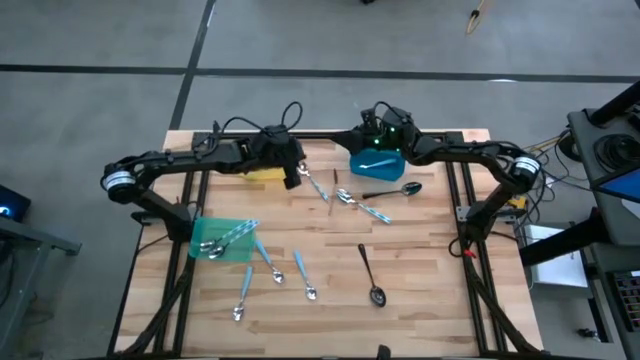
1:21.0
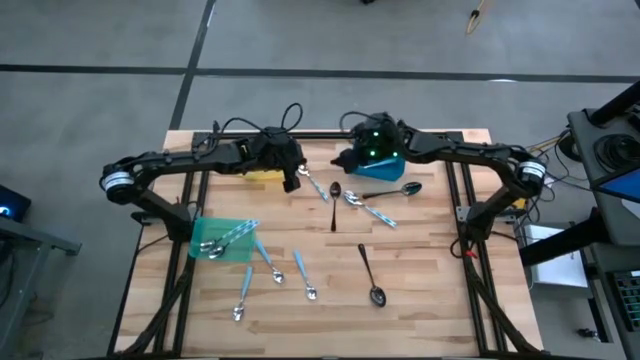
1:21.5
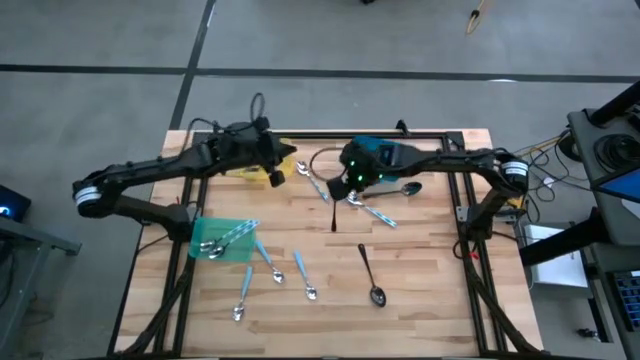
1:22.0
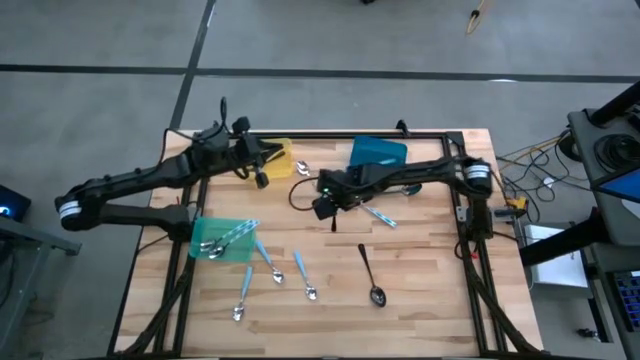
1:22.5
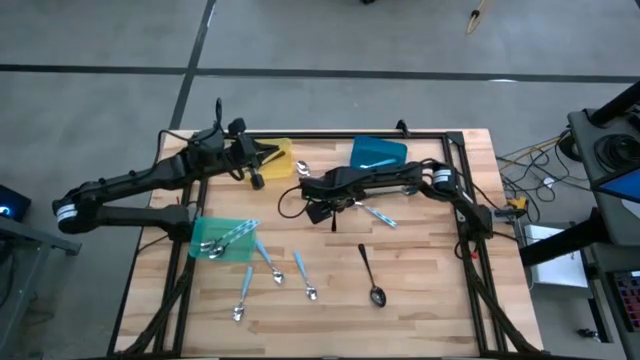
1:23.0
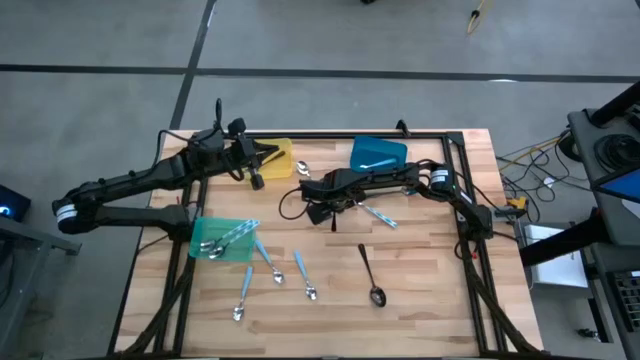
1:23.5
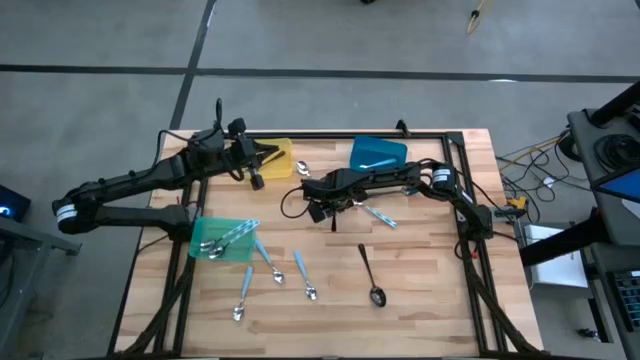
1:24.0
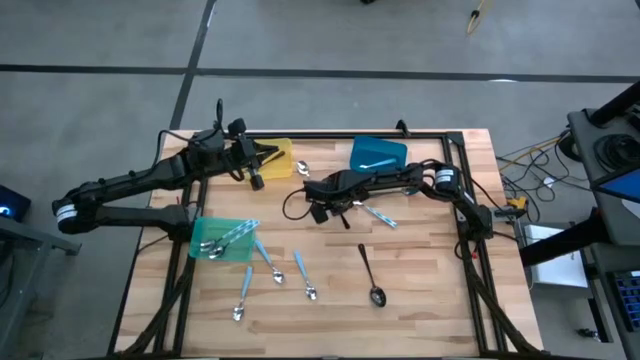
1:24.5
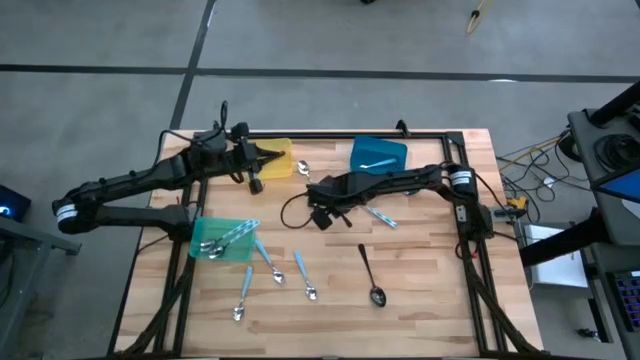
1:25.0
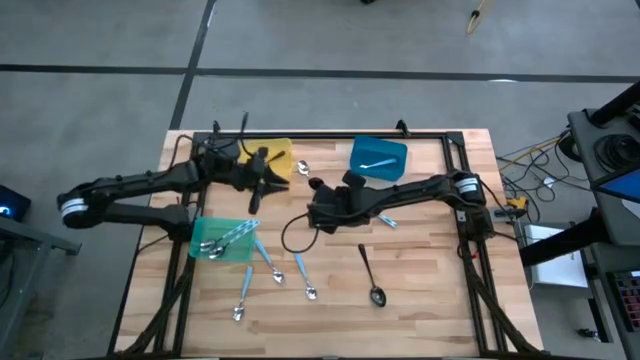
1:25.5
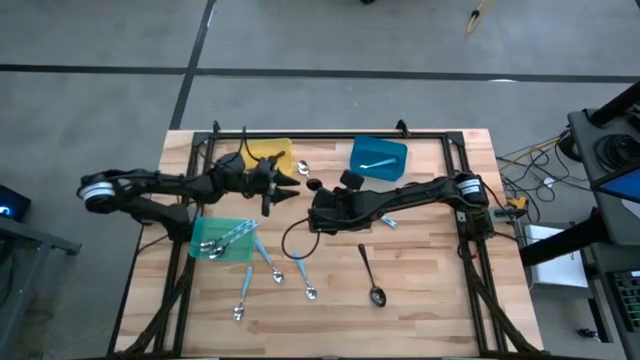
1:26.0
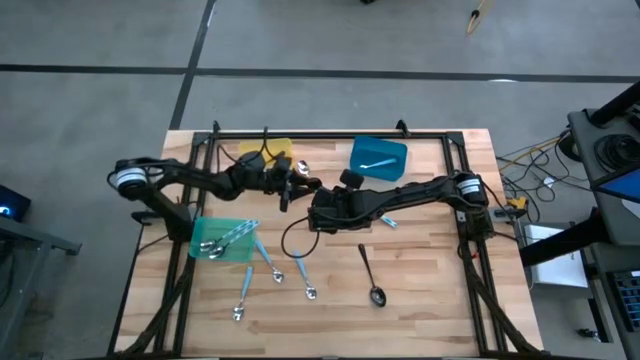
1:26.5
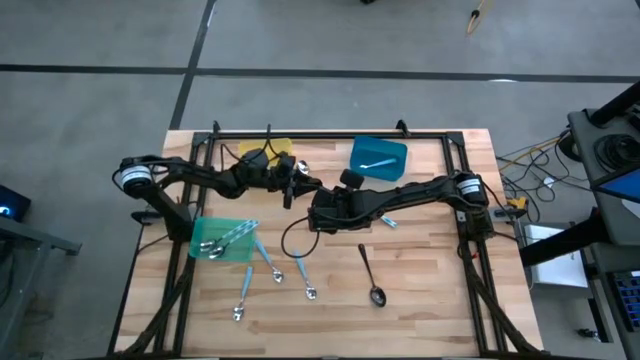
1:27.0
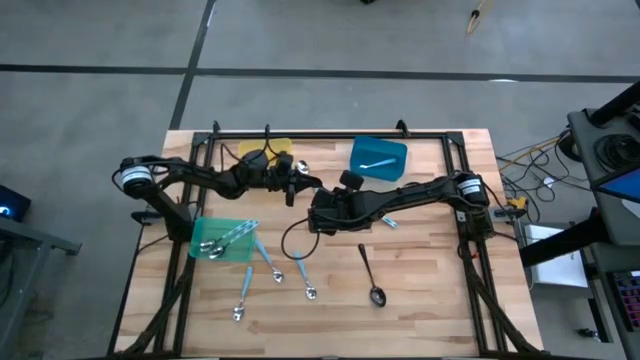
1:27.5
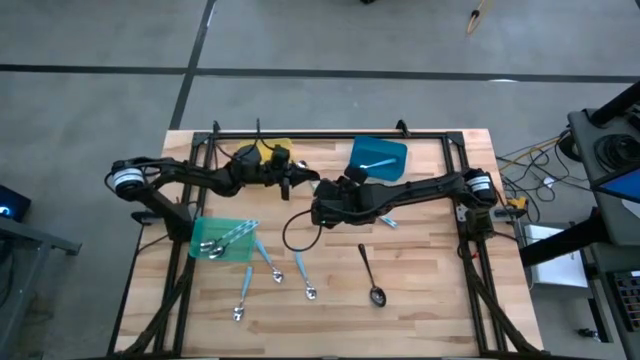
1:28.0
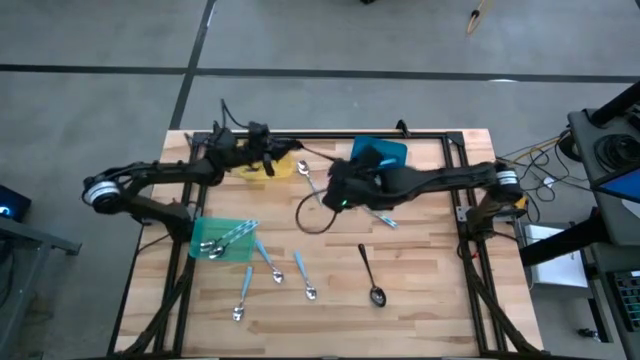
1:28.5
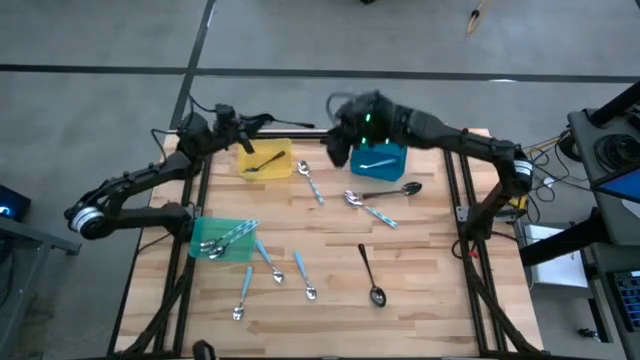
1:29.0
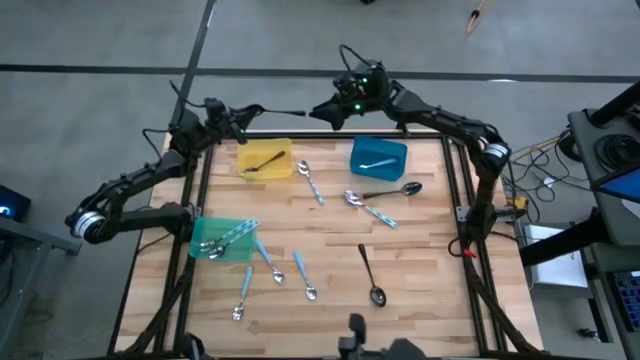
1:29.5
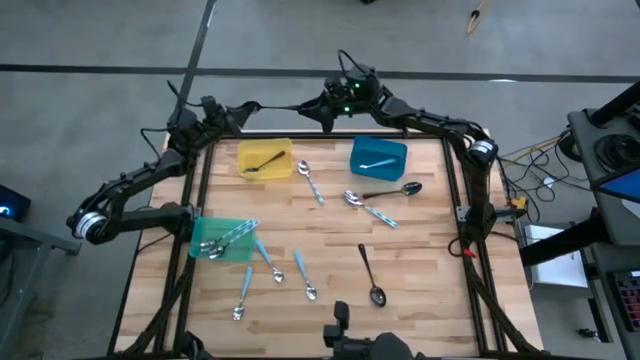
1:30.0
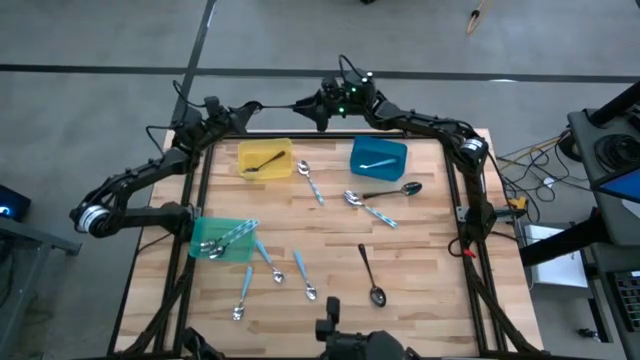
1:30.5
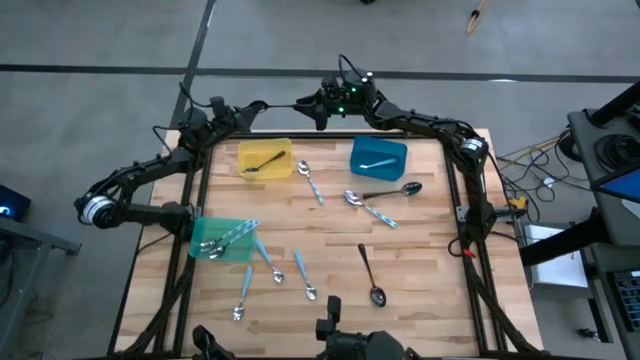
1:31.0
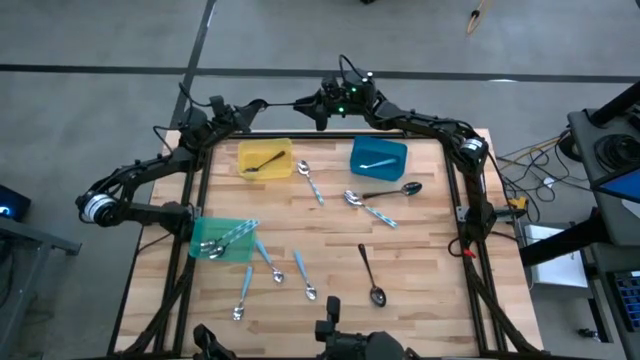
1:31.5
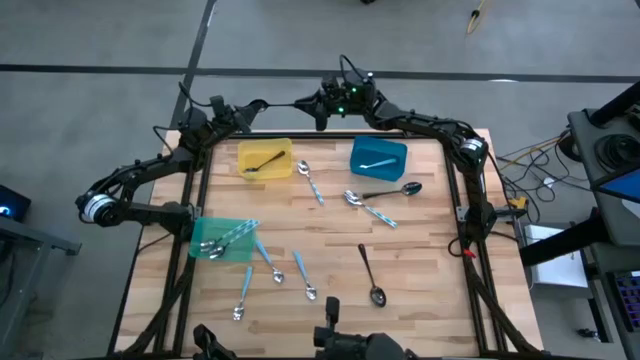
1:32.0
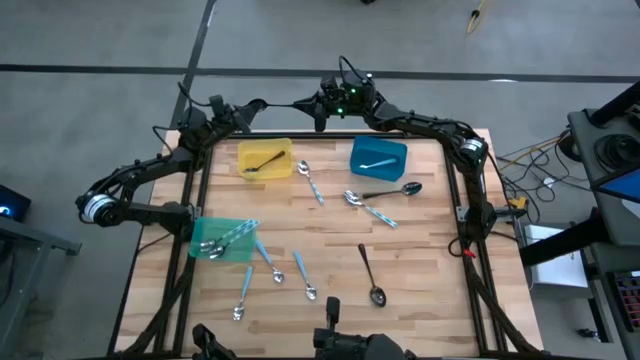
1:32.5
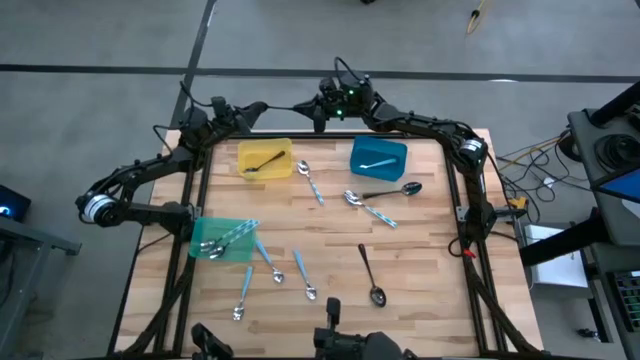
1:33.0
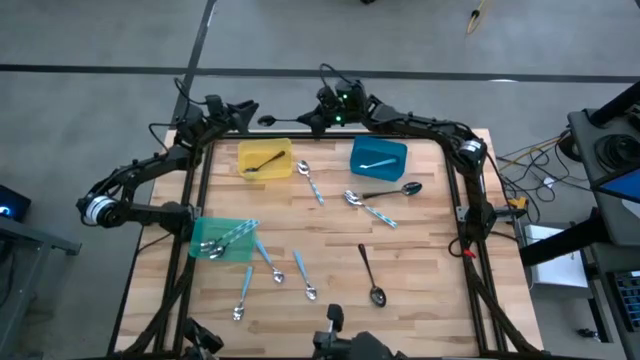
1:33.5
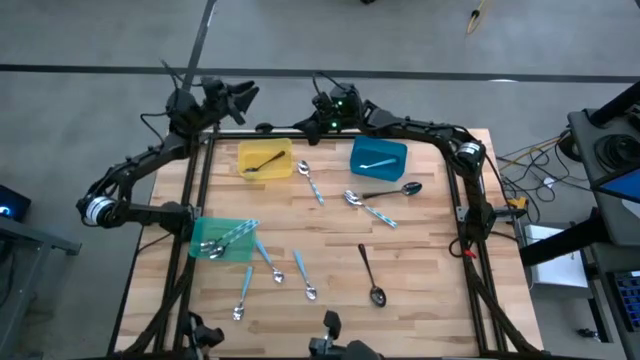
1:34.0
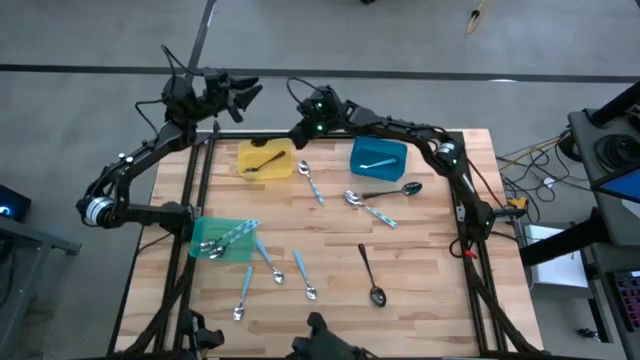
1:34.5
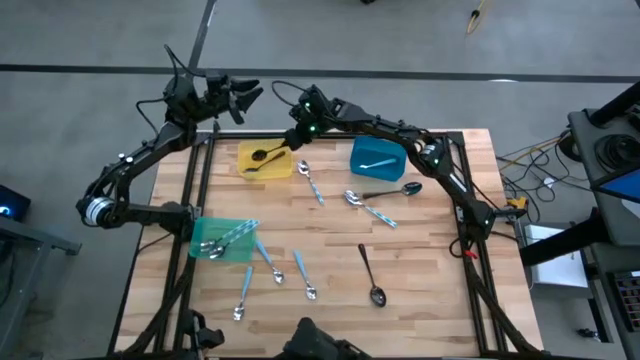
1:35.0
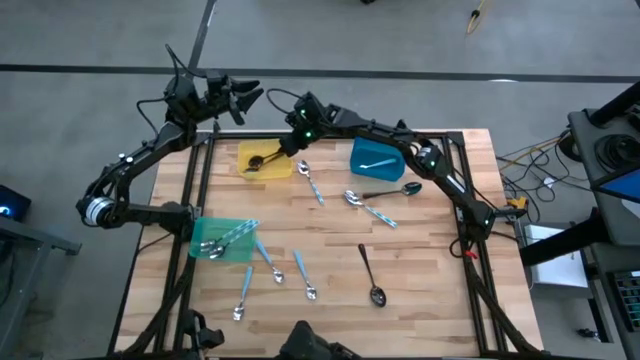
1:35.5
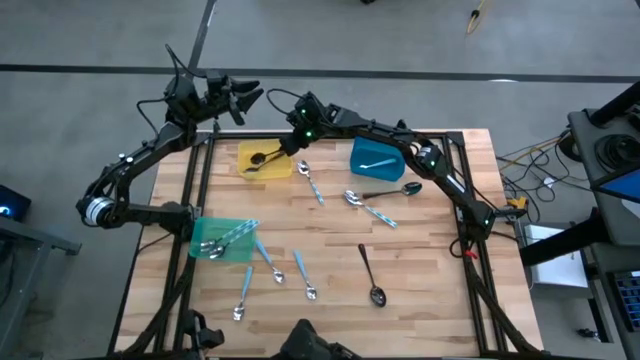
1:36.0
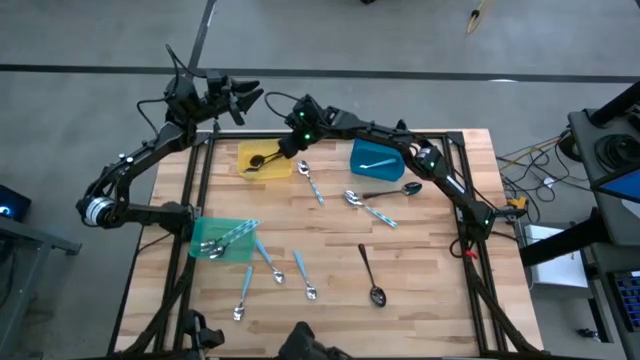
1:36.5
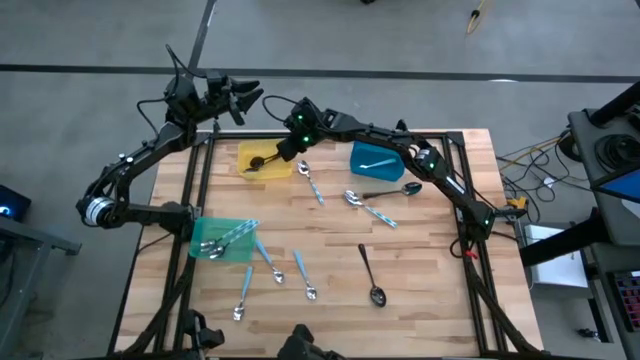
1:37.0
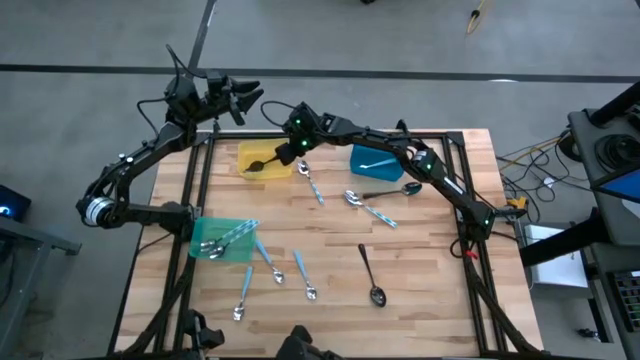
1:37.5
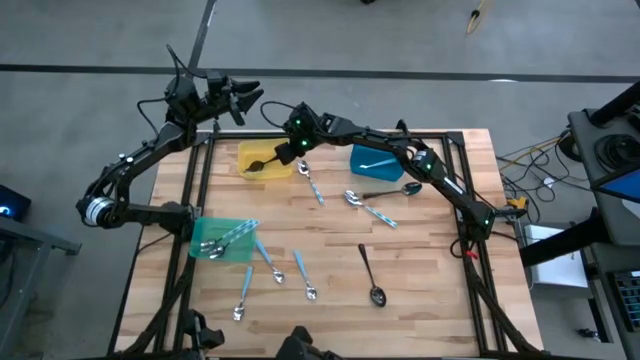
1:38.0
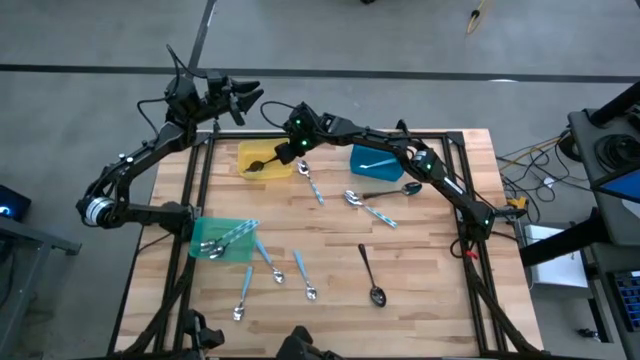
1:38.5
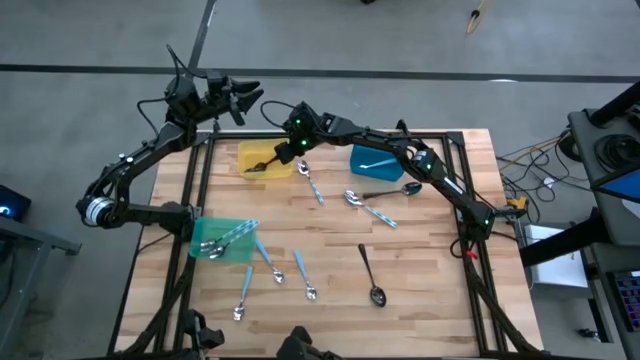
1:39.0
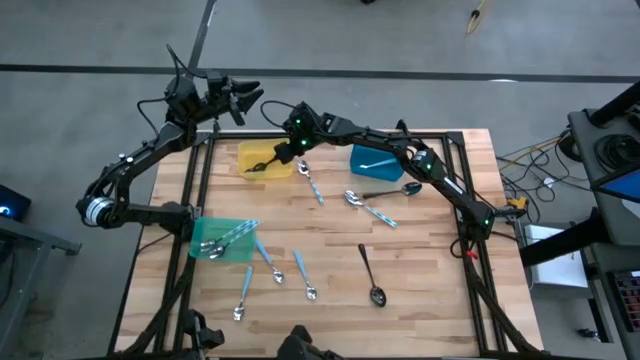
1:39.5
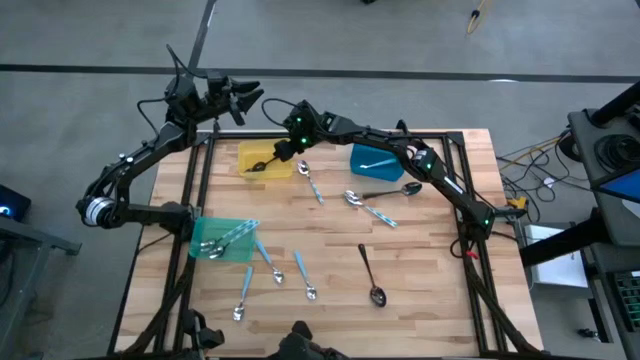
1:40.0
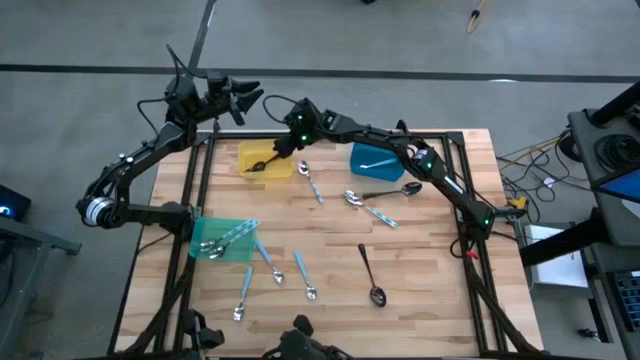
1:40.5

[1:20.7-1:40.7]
Task: Sort silverware by color (type)
Put the black spoon into the yellow bin
